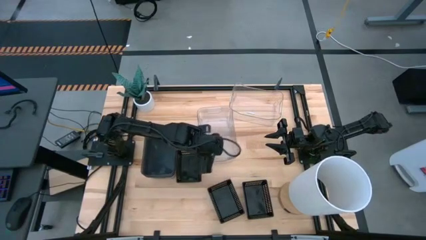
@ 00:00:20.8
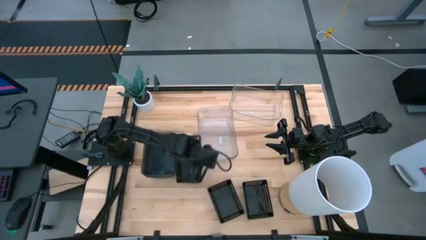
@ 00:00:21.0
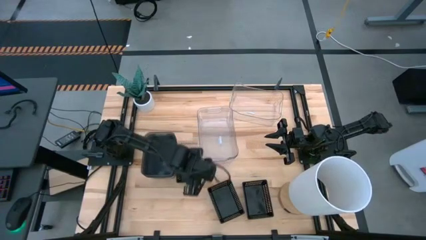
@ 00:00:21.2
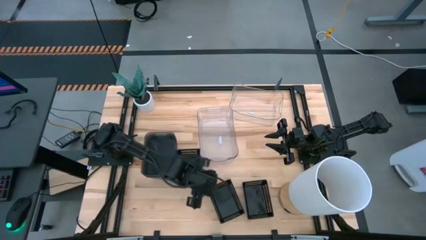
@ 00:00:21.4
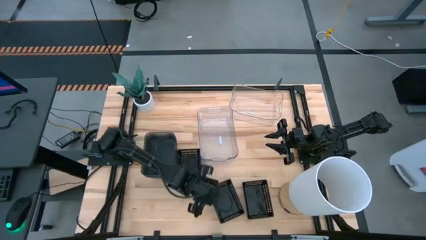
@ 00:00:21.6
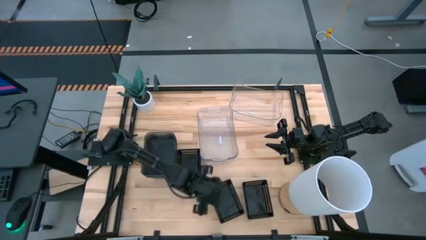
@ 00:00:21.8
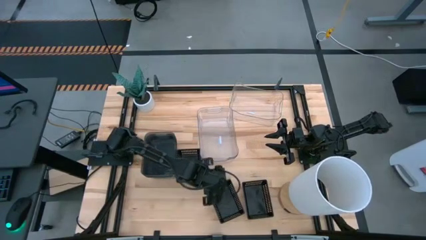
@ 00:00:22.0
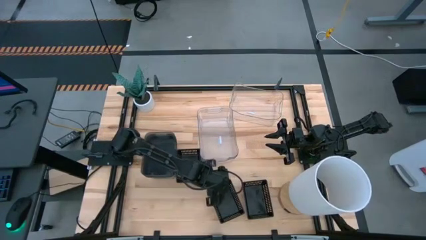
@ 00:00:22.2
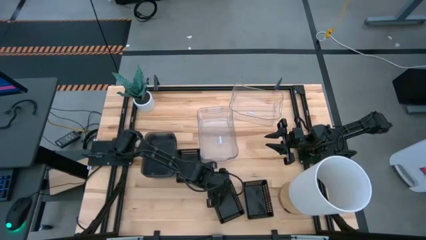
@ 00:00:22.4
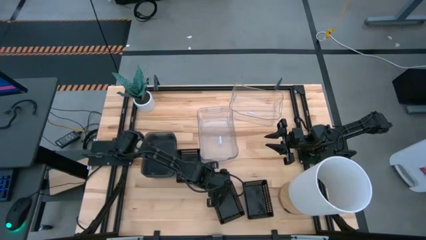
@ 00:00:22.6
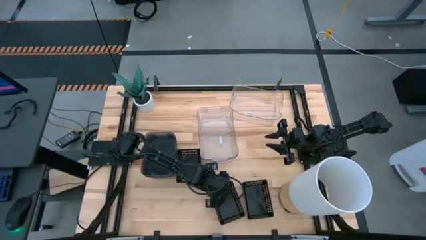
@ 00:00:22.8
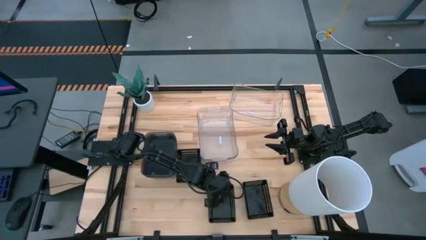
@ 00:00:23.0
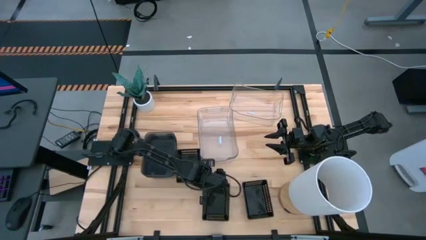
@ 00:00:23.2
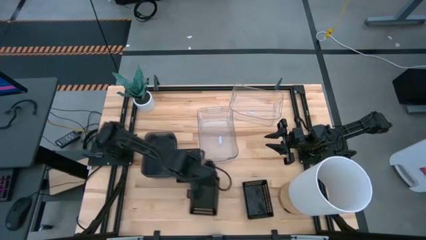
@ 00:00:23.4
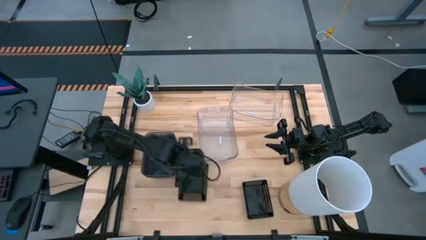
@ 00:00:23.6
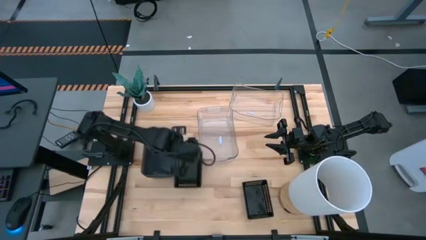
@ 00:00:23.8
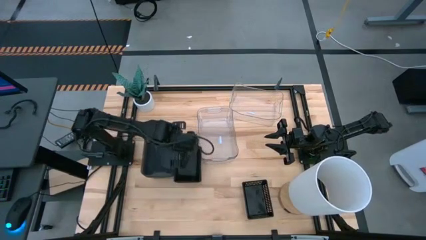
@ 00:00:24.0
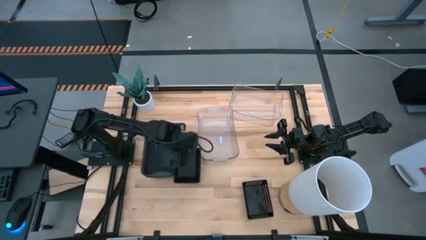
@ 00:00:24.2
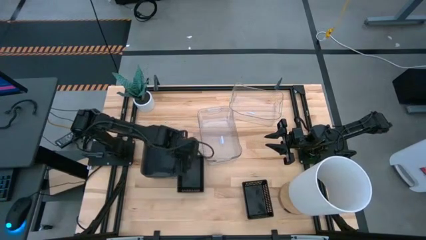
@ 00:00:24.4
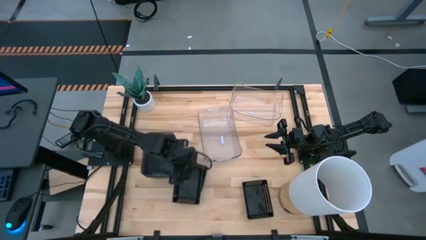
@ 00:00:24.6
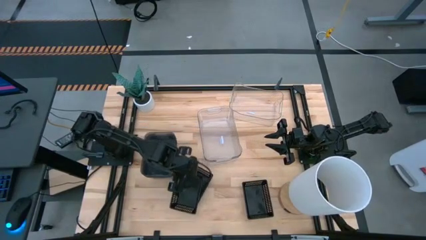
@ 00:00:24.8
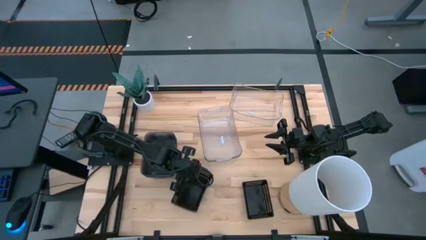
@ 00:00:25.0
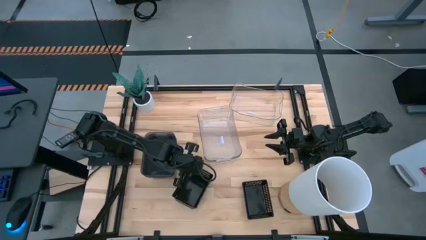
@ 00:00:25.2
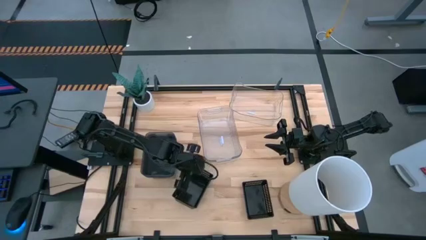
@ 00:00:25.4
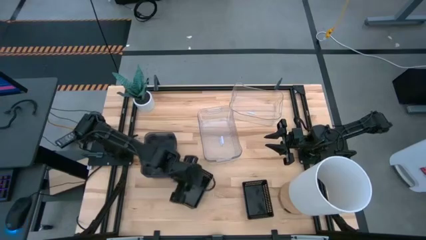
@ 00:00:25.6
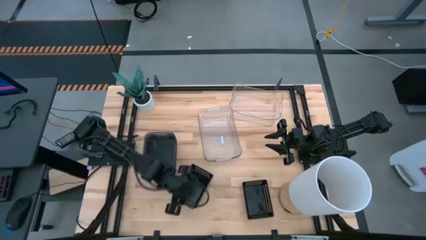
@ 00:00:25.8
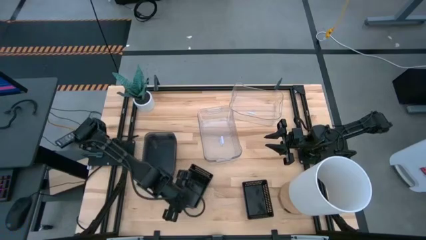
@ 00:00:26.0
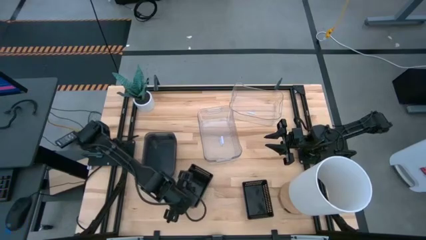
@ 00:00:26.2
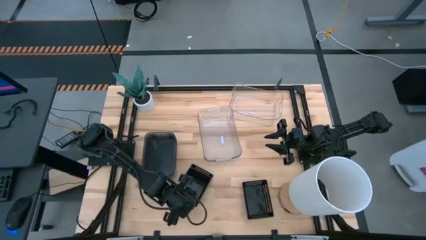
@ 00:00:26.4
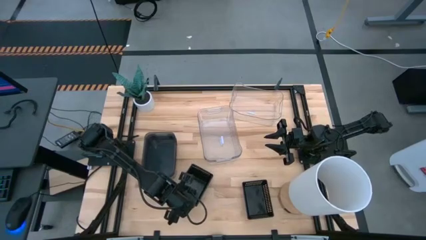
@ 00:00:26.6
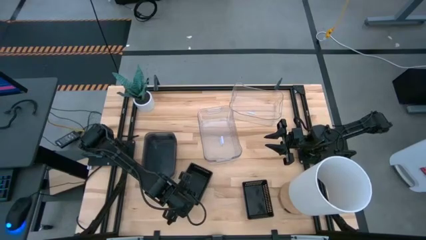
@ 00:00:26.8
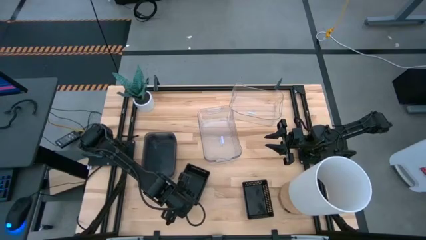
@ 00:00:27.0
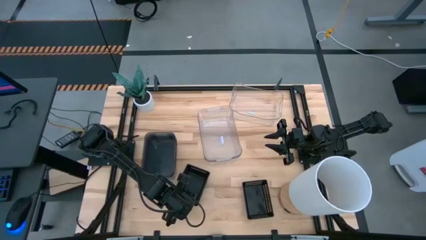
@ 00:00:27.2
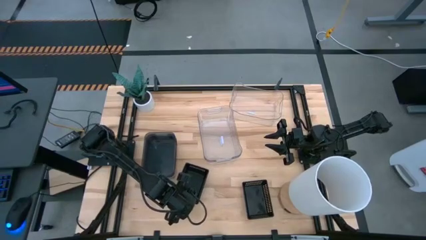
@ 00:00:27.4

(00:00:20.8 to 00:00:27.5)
Stack the bottom left black bin on the top black bin

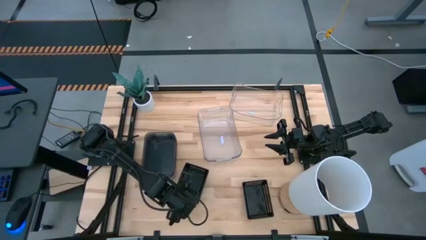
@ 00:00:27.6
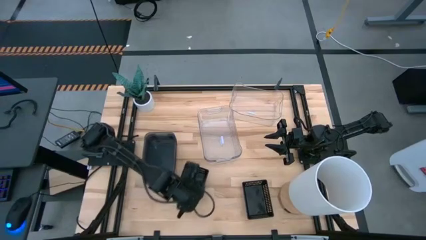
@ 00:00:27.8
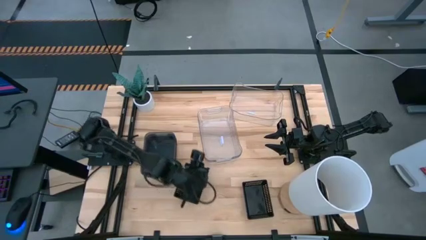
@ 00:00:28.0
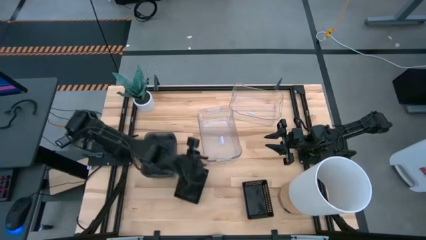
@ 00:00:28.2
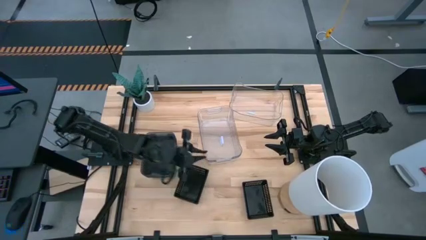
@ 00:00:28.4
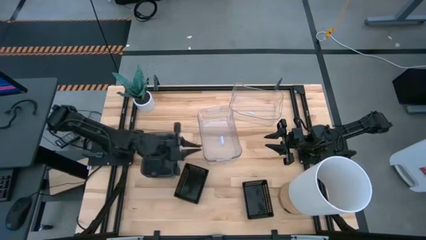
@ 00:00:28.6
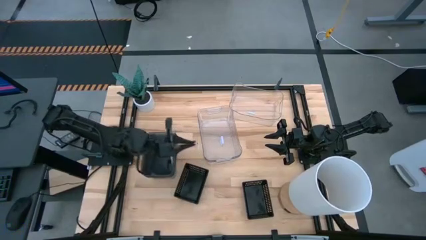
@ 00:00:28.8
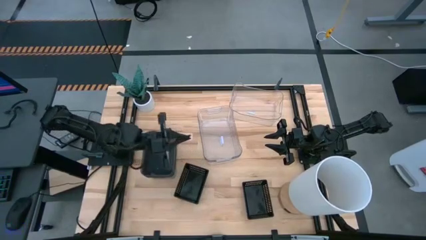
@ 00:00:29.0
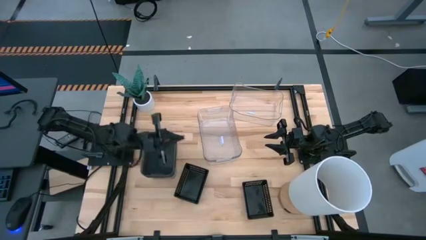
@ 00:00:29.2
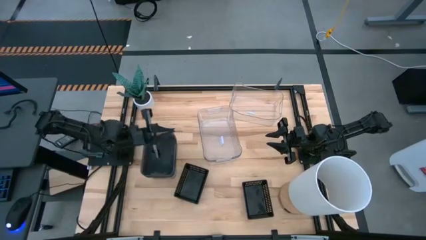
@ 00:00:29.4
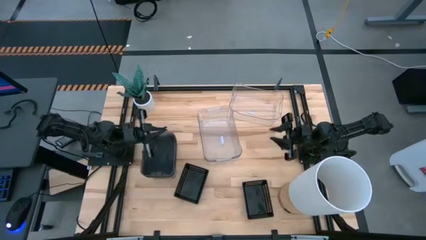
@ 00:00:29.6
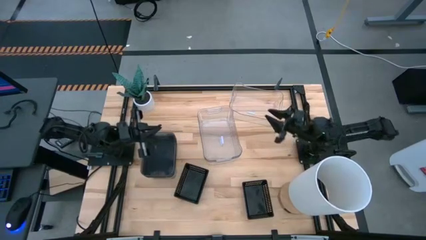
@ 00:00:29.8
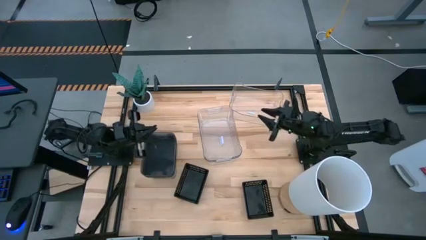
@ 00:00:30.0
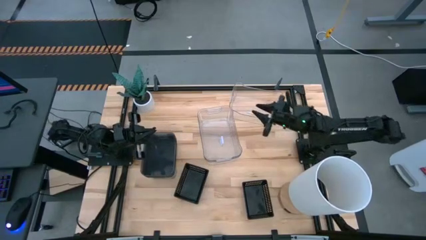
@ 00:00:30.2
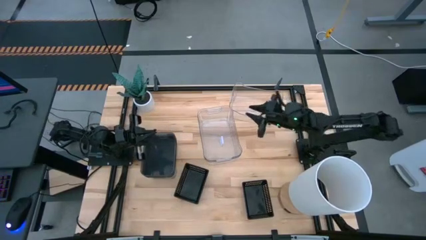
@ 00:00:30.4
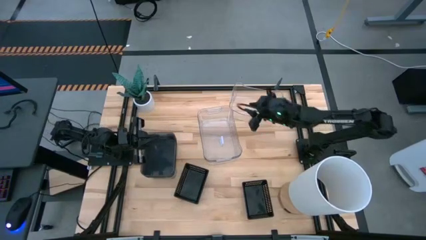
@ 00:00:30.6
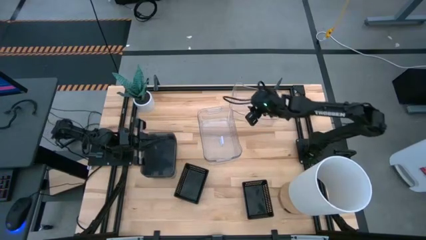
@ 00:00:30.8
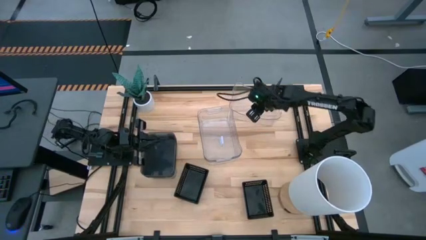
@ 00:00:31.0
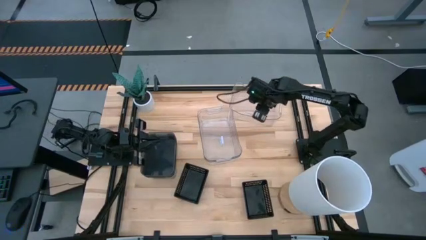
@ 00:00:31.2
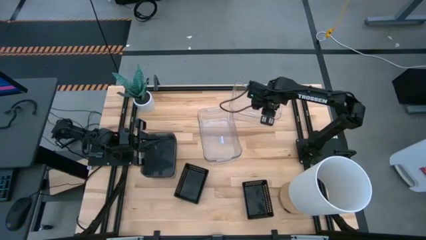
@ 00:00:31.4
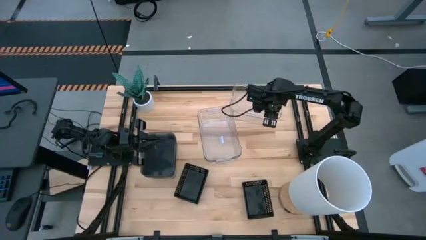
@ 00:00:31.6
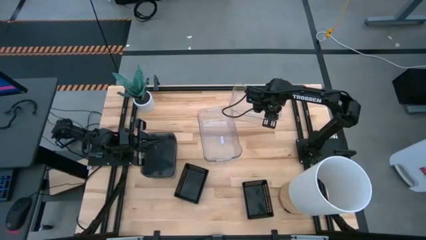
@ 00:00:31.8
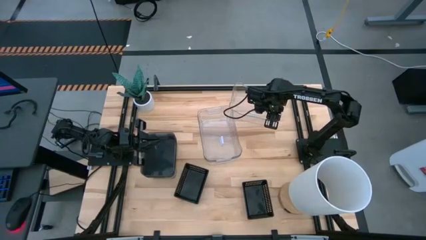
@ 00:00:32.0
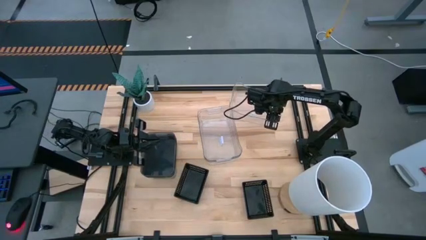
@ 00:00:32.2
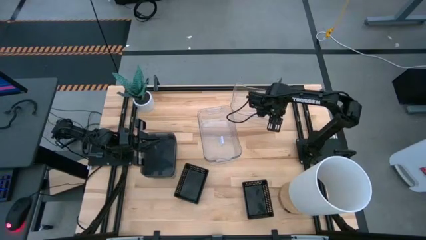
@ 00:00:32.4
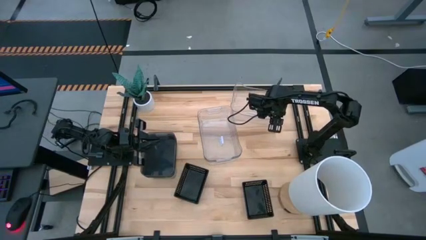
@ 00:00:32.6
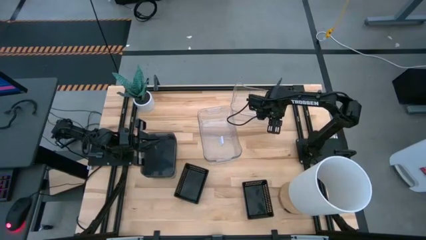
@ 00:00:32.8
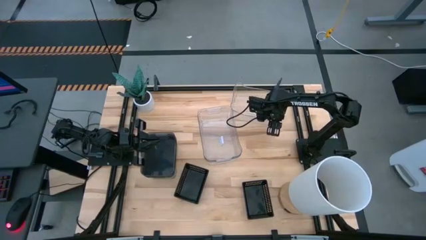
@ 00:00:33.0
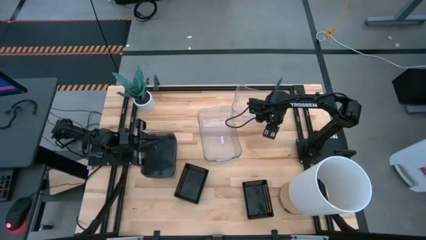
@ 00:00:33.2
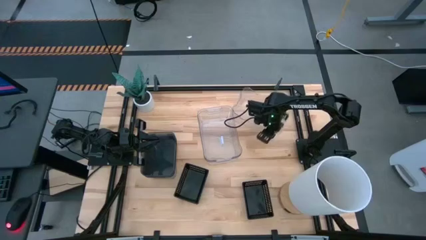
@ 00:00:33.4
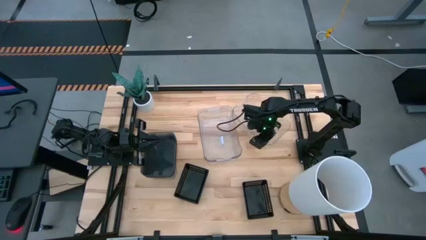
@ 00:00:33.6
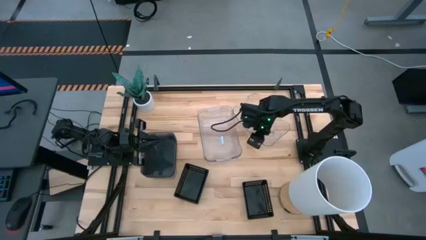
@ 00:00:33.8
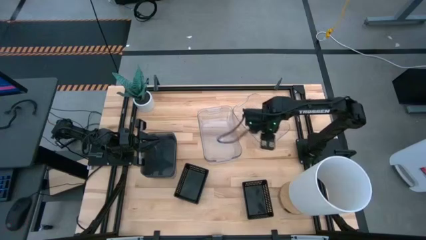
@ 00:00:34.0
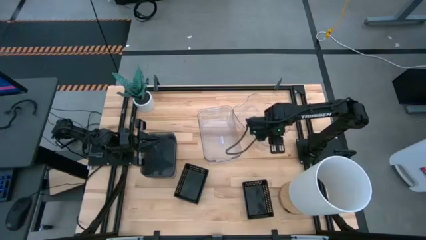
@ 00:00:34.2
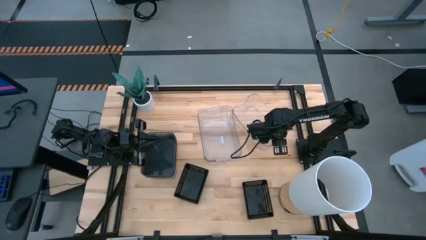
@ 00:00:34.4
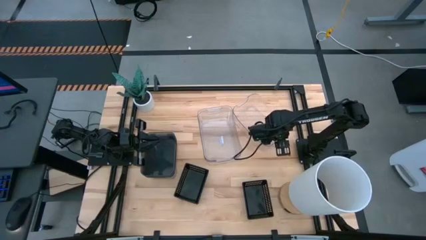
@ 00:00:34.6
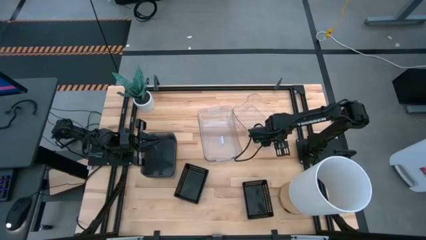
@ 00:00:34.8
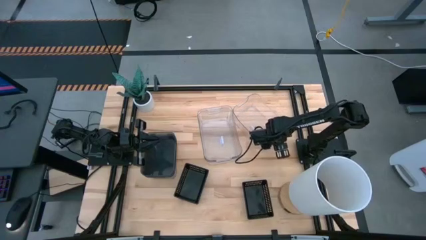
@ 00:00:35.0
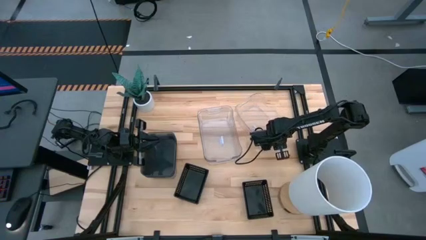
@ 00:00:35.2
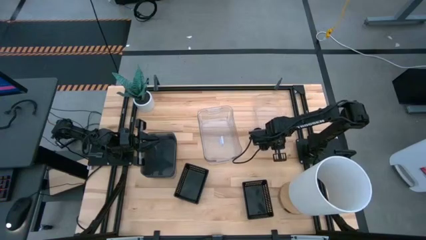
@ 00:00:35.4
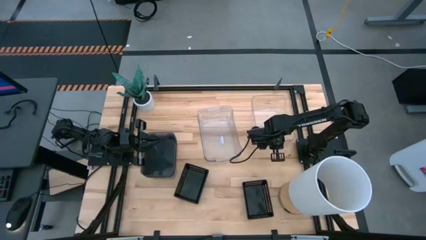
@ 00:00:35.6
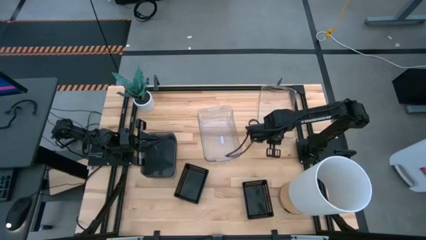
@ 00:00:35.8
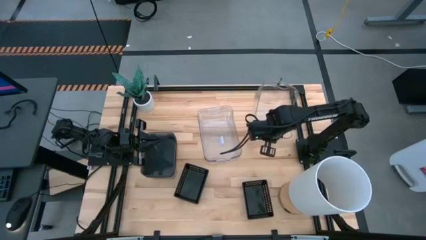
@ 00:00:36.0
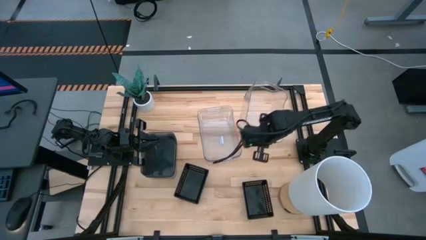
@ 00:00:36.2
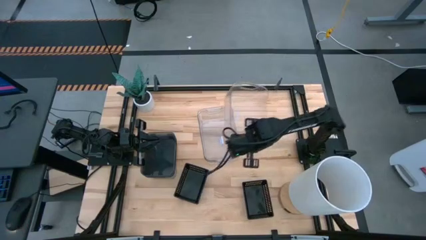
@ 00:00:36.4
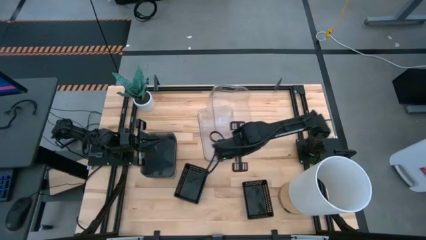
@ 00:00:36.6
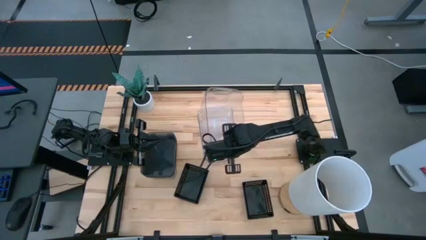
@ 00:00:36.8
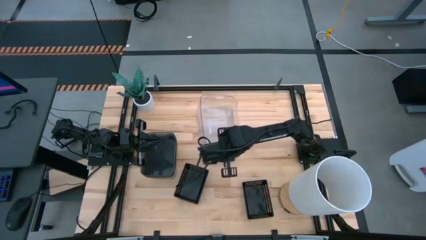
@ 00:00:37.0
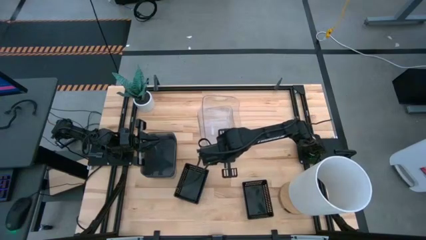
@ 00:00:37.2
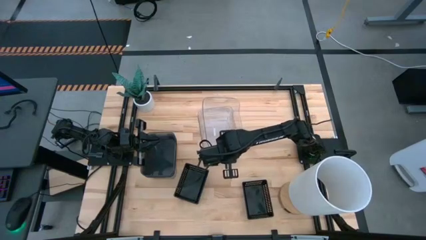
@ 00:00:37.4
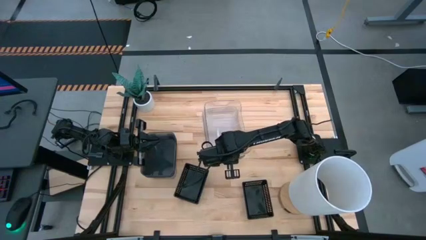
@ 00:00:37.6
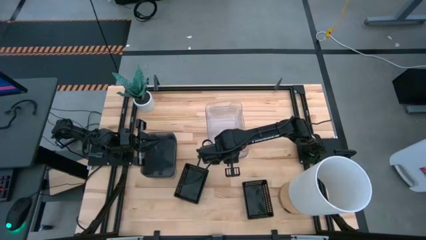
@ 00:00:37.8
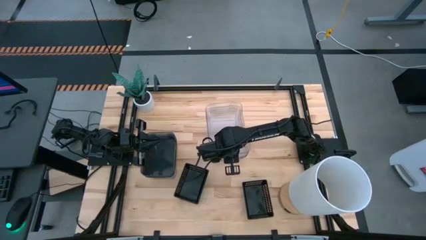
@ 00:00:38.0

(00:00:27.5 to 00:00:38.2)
Stack the top transparent bin on the transparent bins

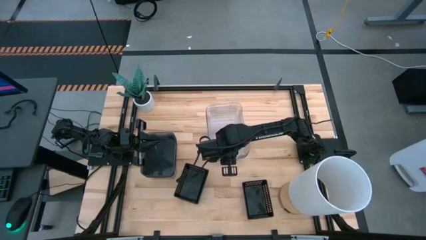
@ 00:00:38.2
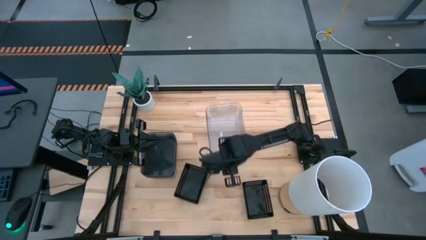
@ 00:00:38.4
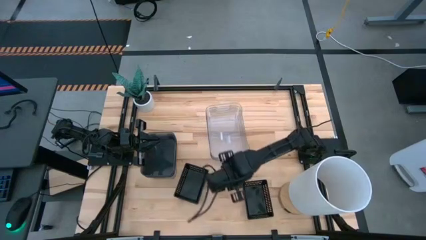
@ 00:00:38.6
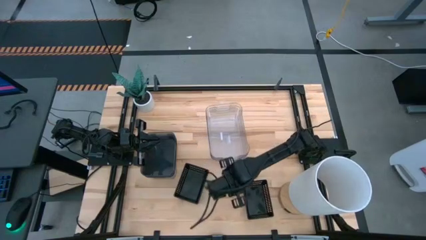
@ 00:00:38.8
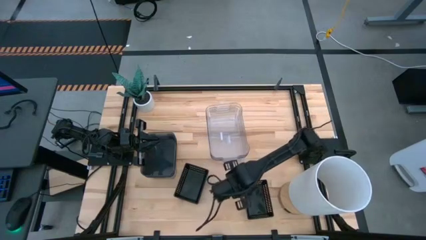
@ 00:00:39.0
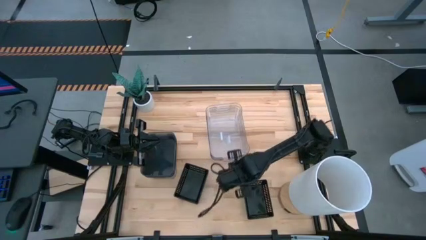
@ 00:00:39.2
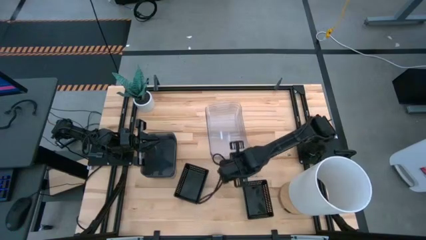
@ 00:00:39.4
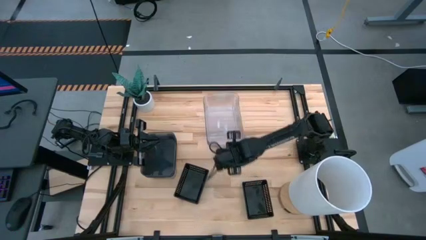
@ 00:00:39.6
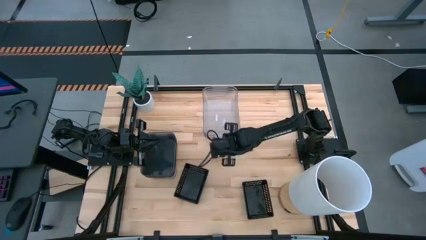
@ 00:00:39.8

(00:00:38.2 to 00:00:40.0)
Move the stacked transparent bins to the top of the table
